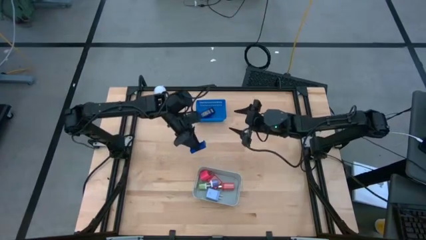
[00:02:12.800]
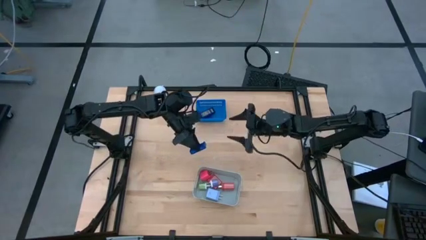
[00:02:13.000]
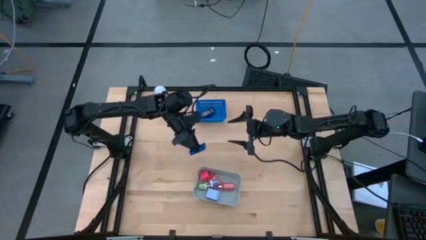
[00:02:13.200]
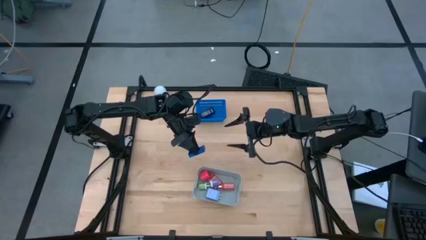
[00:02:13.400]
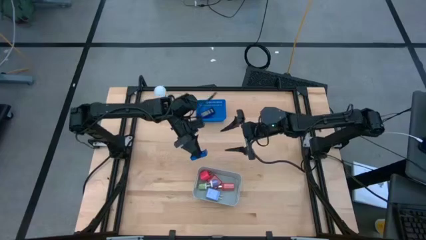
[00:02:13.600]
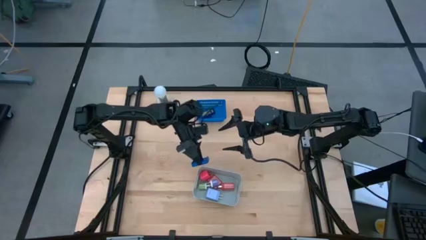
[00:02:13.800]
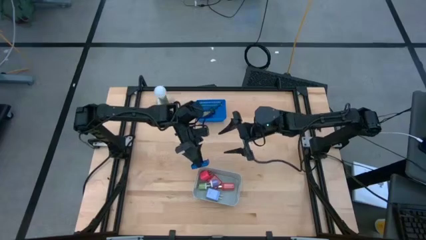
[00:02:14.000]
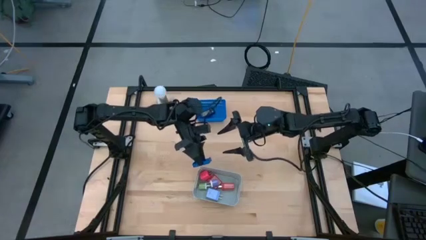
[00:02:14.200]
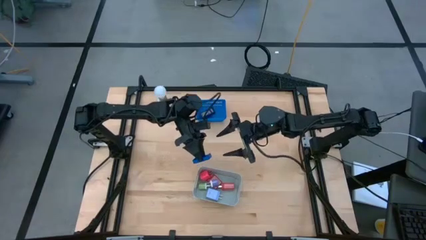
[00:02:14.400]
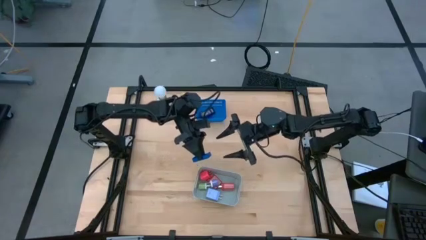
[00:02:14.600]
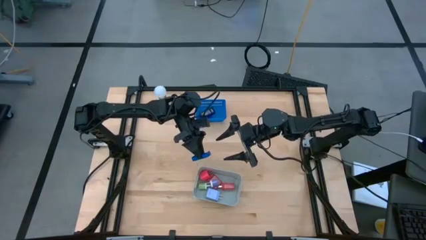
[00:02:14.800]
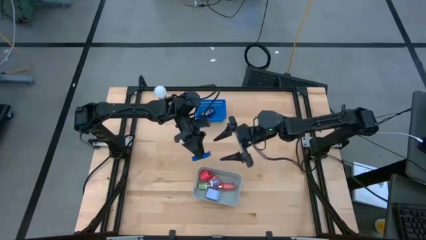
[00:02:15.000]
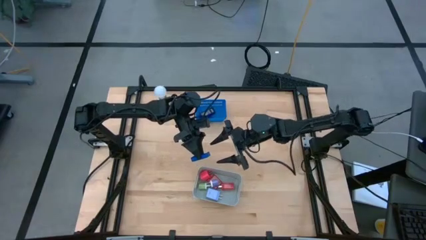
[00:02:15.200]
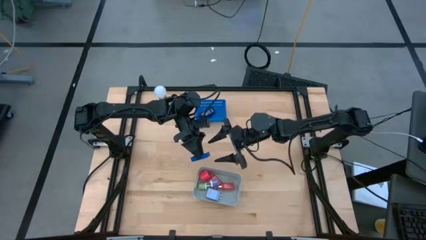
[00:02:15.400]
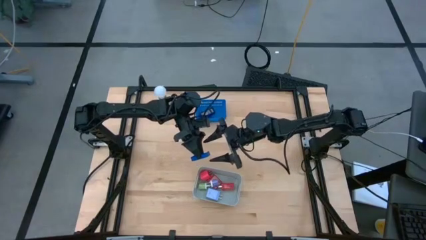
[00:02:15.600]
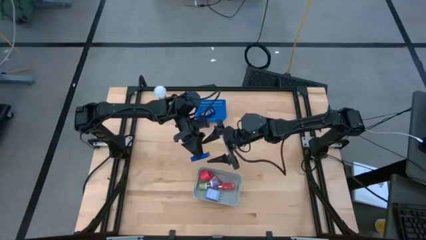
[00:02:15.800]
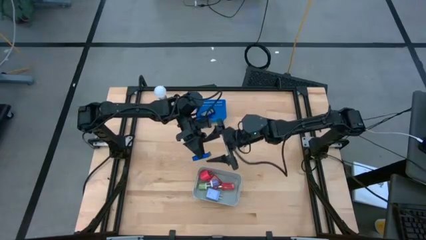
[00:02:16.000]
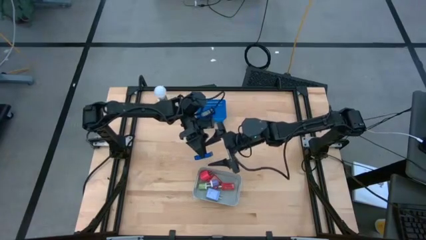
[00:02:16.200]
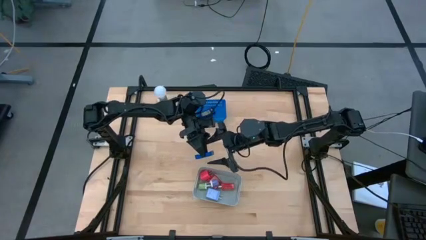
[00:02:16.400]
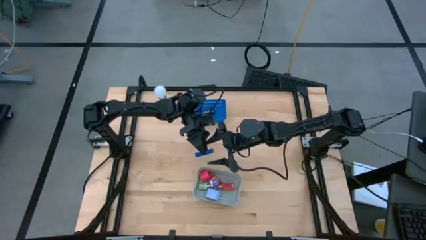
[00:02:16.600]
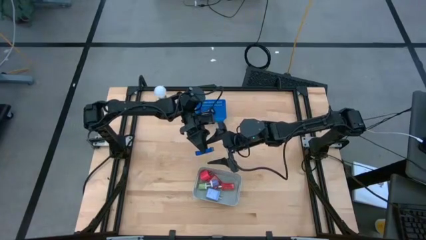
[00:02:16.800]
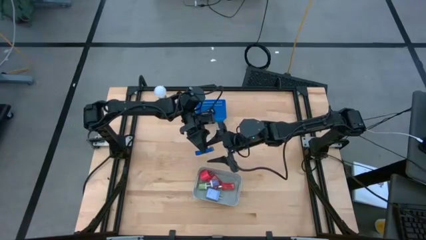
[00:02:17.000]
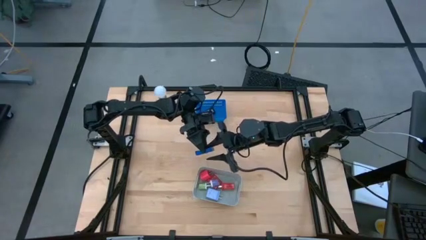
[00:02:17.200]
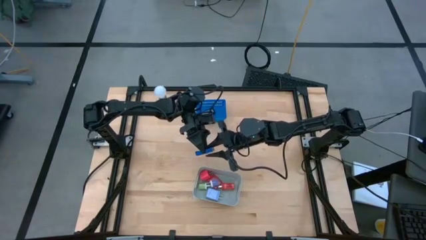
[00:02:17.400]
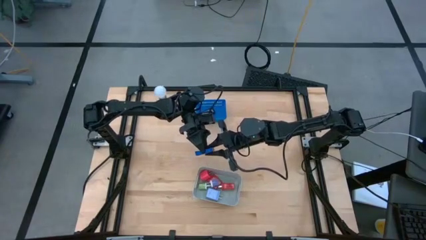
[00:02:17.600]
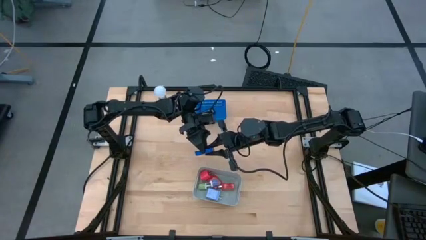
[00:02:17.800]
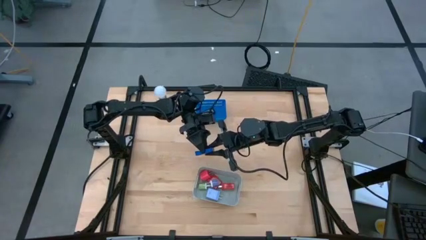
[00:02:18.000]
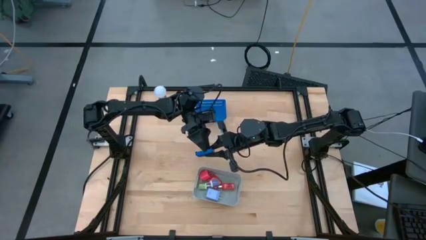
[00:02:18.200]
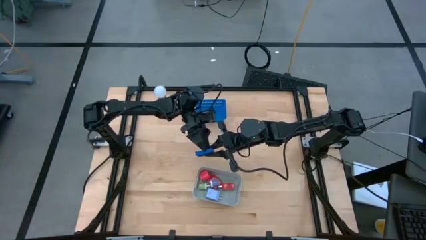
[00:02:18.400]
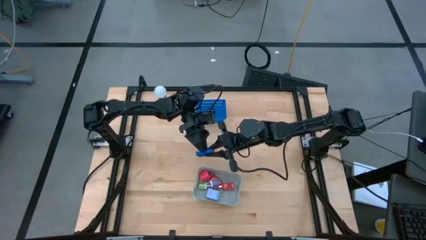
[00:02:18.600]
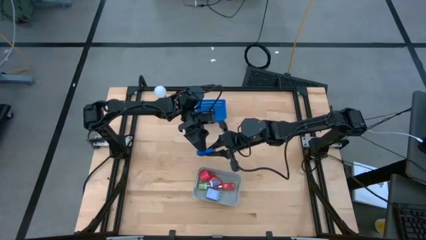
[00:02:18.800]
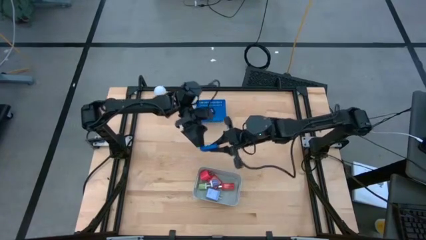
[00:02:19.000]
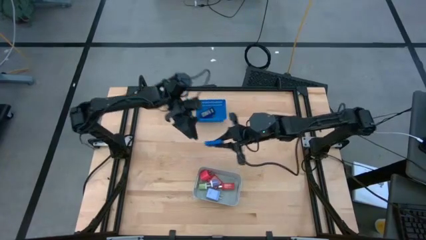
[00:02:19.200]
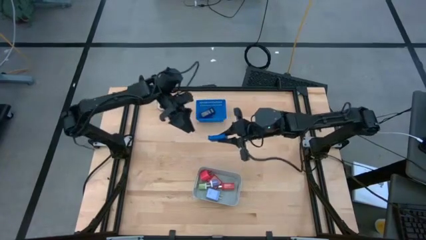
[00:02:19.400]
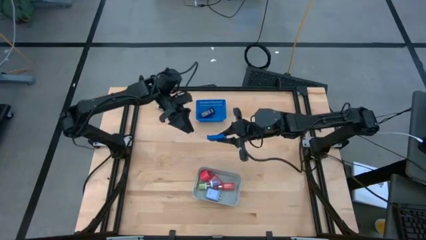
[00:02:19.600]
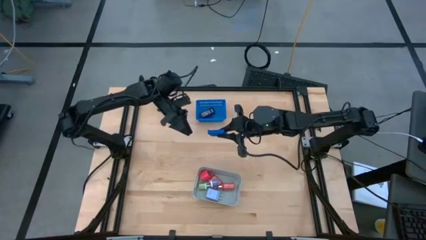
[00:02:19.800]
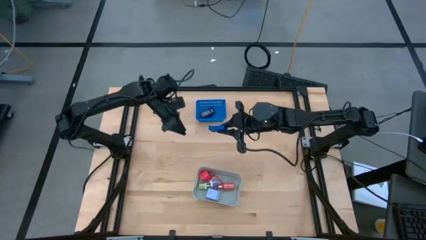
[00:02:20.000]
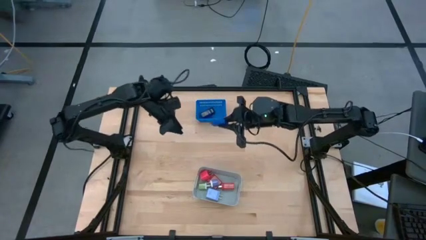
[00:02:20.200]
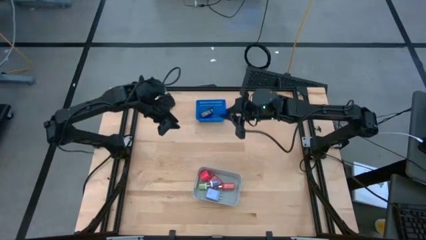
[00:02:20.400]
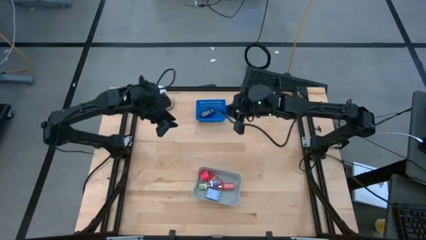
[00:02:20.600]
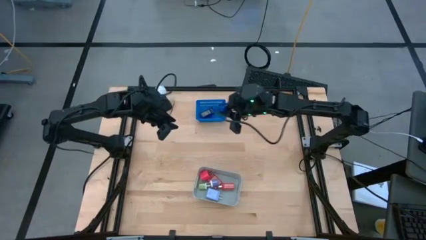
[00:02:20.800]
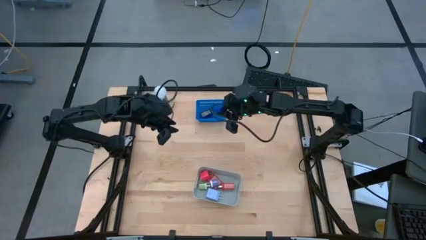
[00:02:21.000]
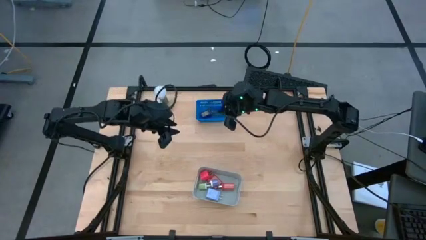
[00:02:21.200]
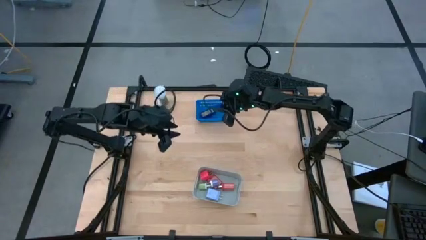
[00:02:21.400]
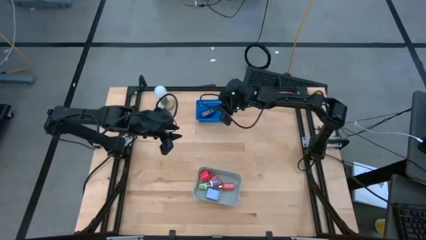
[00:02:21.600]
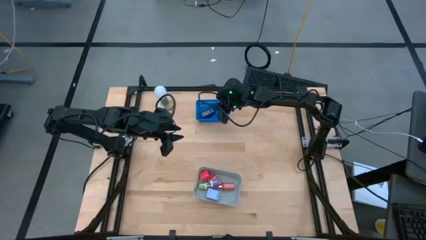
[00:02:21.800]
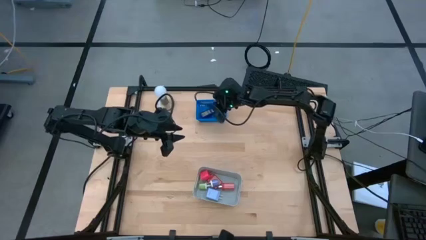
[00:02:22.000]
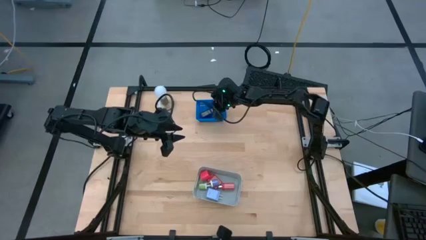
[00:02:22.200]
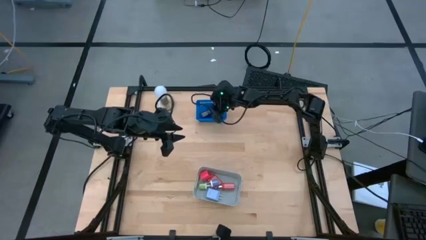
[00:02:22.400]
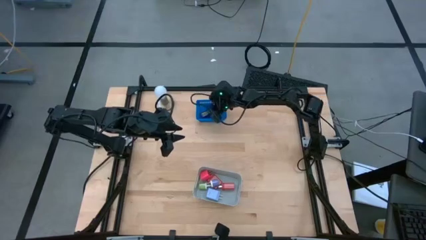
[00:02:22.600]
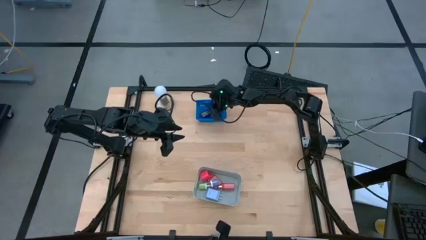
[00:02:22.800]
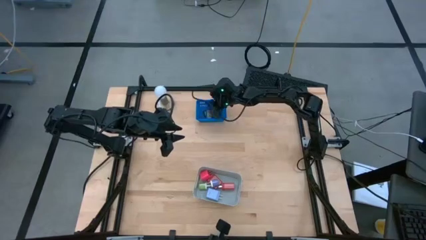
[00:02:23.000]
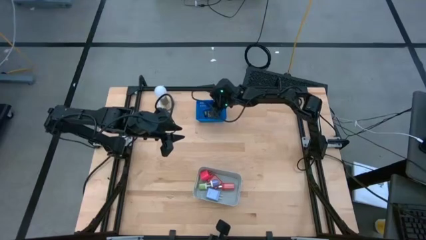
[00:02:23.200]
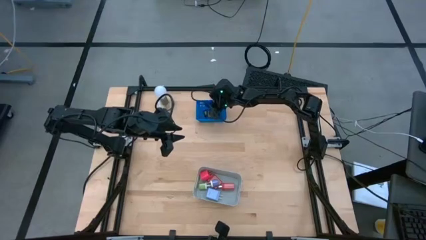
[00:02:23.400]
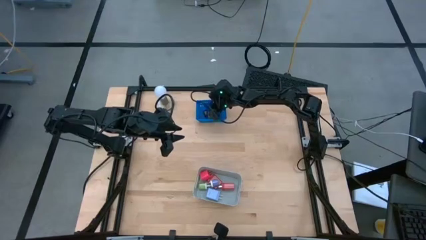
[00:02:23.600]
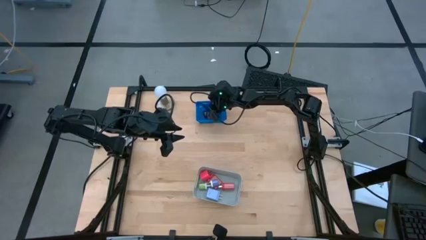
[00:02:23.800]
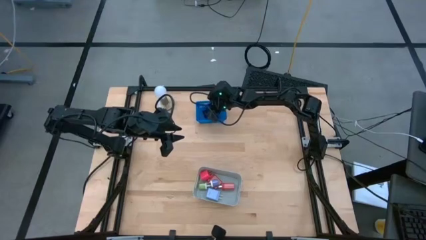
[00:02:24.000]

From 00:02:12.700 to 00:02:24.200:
Task: Pick & Place Office items
Put the blue digital clock into the blue bin
